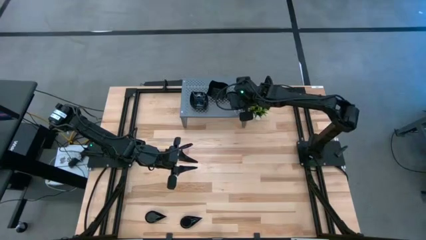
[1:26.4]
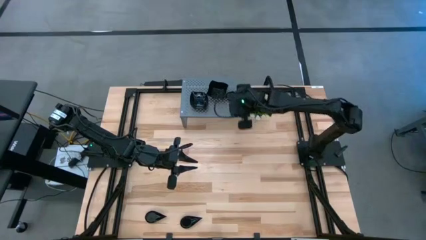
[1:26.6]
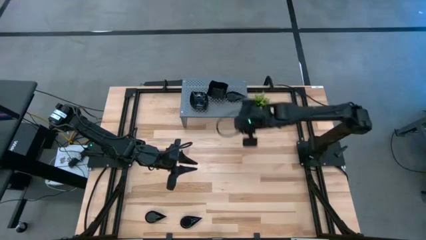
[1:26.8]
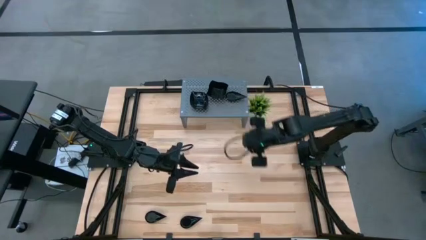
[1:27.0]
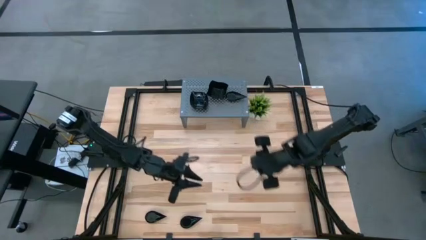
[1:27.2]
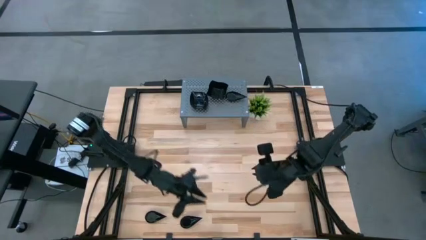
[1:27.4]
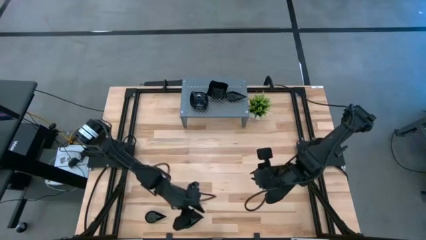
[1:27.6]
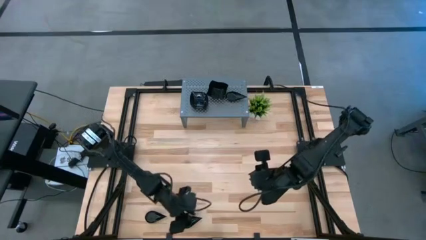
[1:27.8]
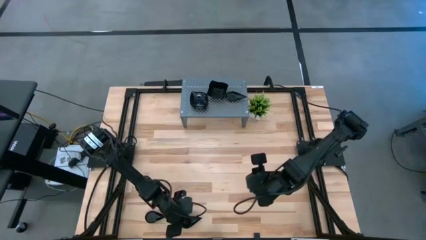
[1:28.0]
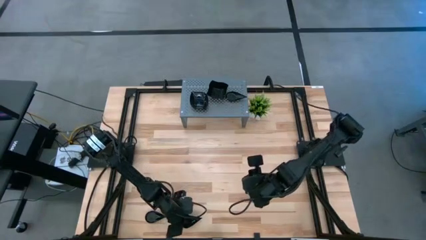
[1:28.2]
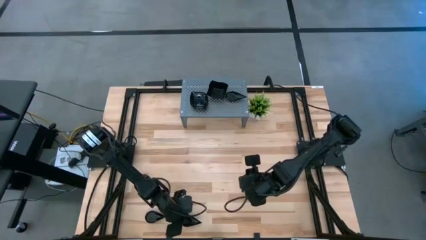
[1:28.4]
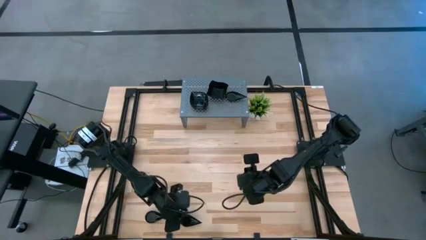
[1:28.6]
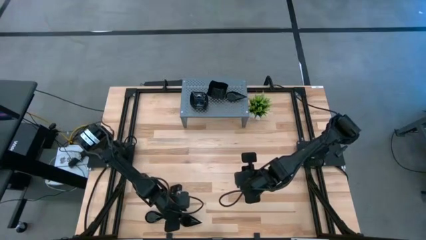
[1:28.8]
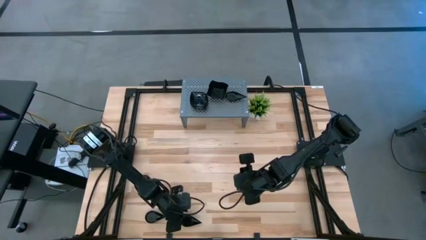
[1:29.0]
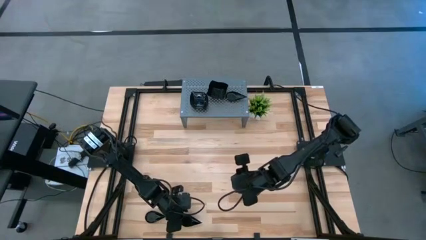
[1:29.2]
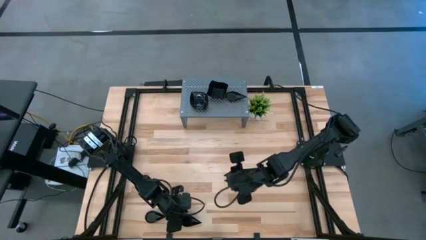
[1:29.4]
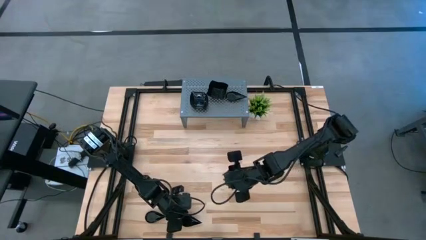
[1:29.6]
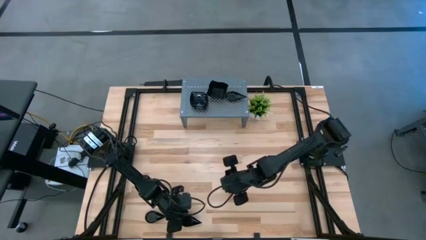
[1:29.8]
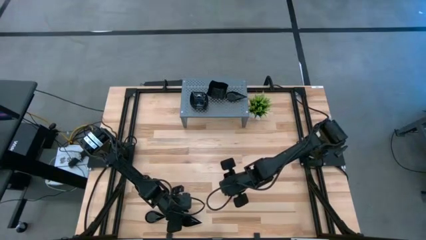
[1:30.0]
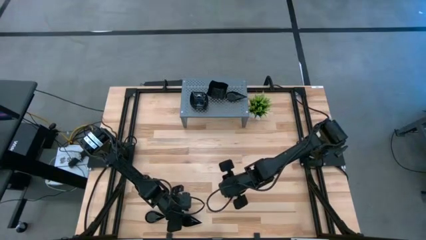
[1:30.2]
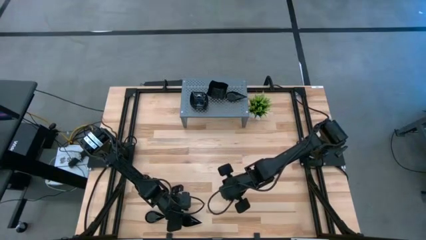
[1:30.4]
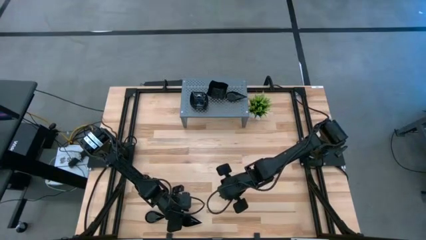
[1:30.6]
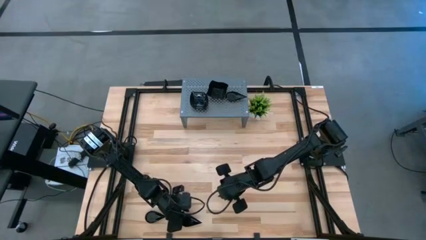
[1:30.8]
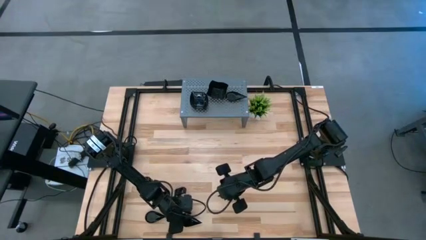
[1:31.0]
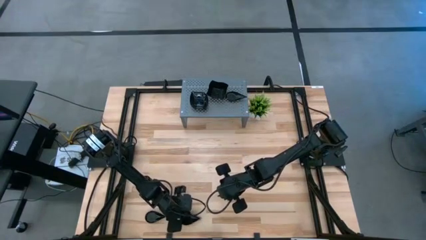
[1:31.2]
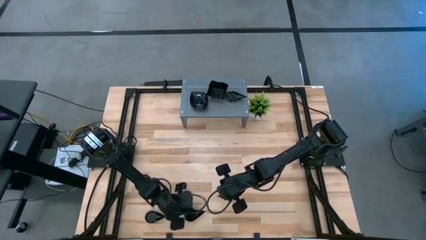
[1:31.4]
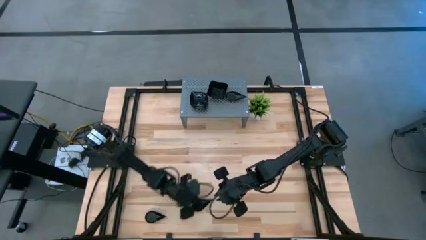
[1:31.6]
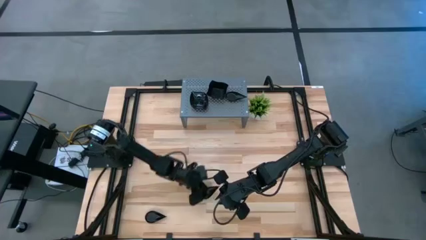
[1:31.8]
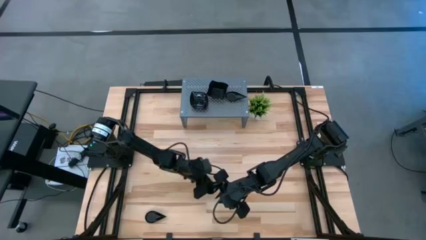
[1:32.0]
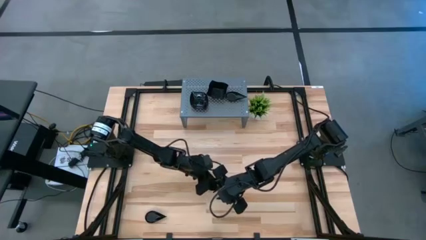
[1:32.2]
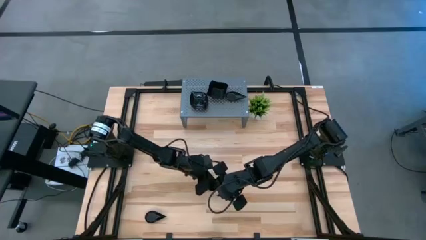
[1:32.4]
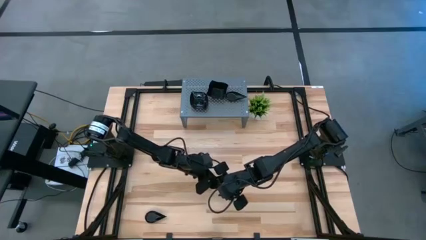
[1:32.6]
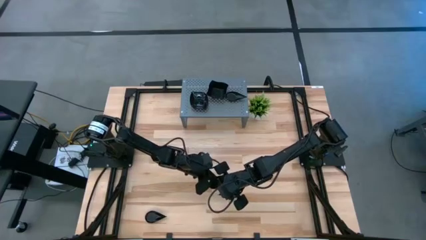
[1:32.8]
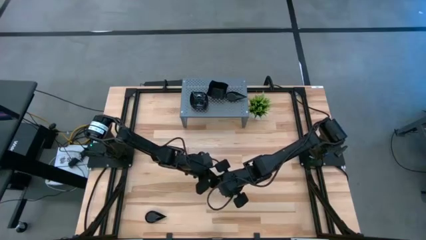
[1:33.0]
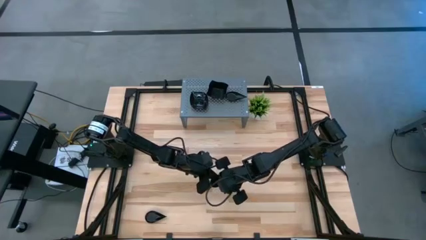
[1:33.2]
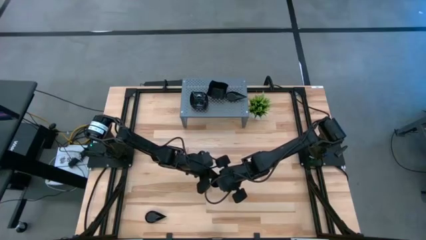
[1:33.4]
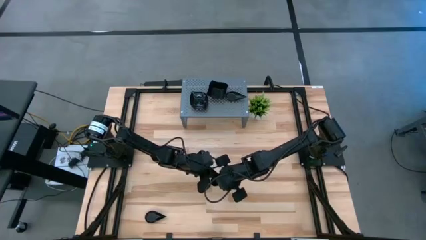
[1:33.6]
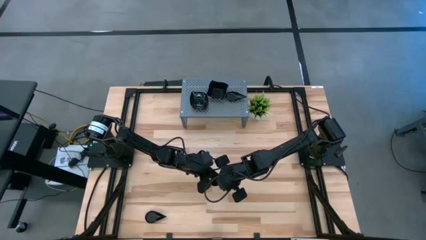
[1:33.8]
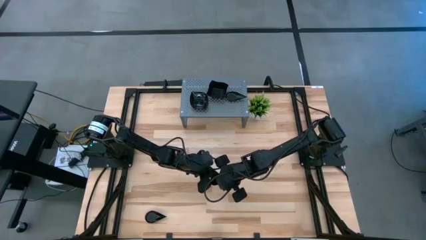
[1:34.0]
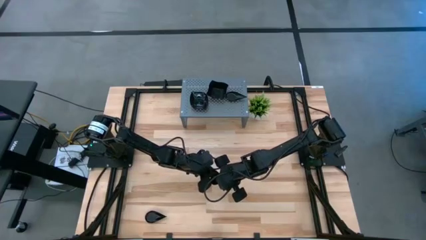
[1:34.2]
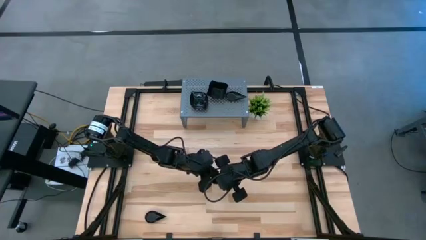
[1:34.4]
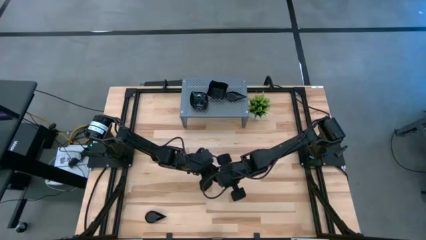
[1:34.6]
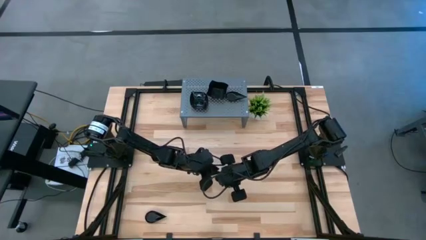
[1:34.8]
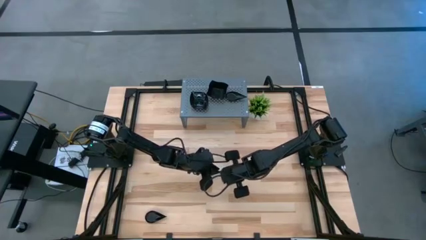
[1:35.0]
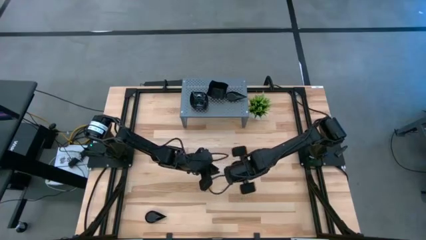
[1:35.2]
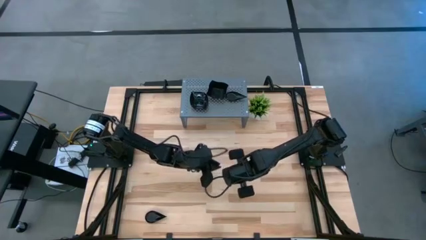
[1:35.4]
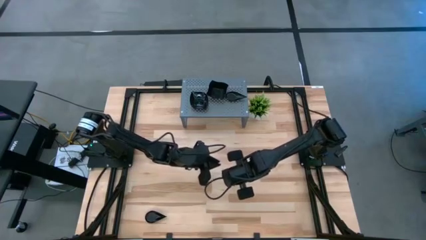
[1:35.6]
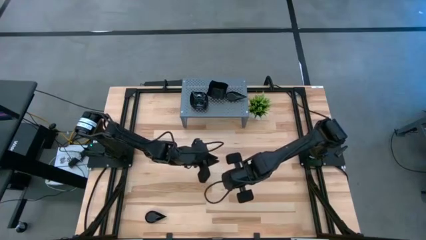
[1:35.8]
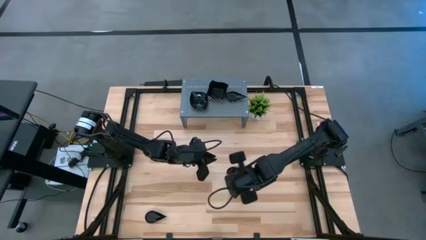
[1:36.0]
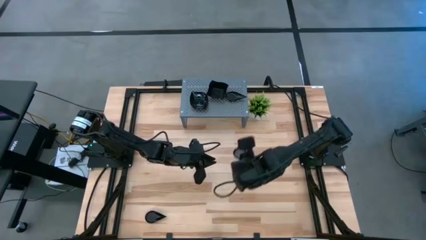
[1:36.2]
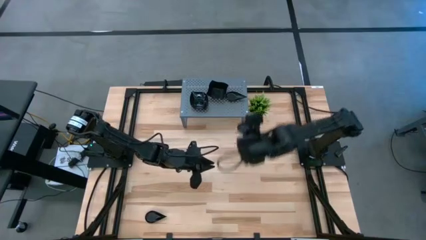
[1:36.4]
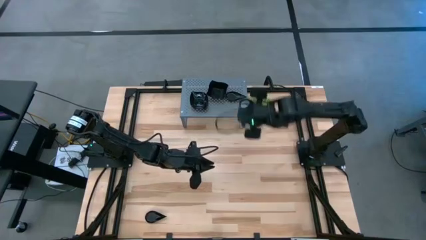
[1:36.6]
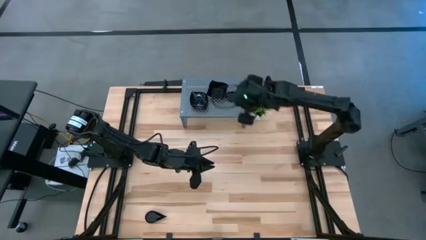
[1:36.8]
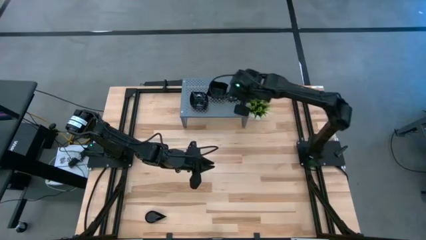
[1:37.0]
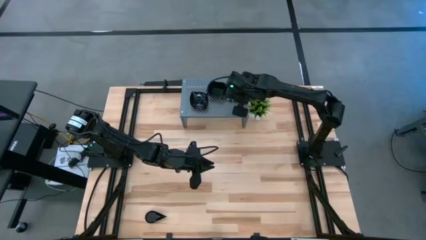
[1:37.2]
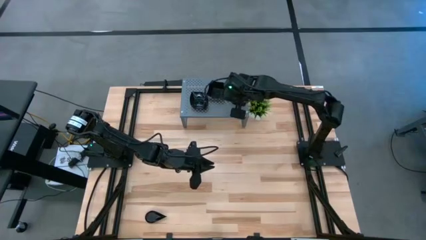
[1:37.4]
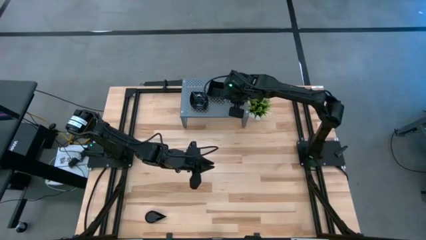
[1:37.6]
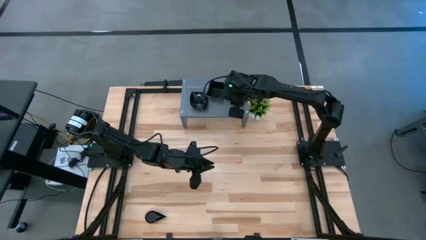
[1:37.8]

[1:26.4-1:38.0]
Task: Pick & Place Mini shaped plates
Stack the black drop-shaped plate on top of the stacked black drop-shaped plates on the shelf

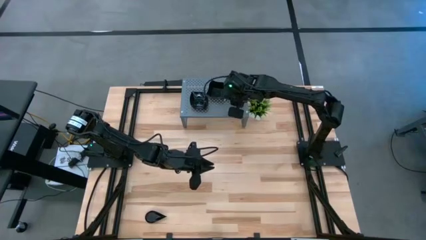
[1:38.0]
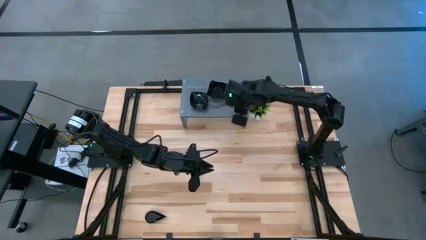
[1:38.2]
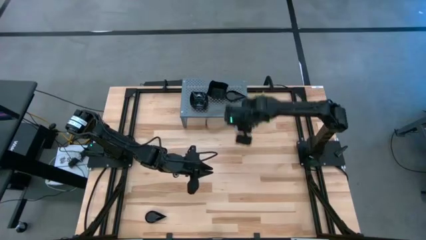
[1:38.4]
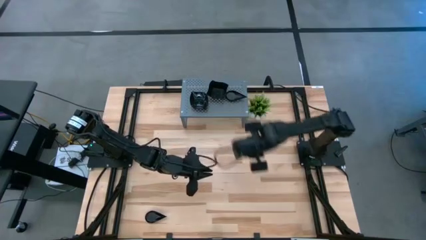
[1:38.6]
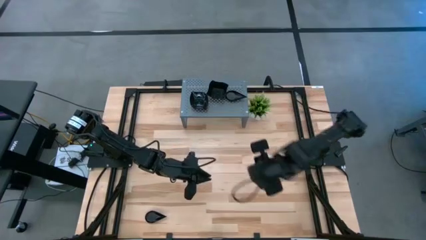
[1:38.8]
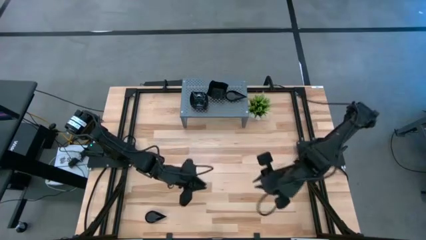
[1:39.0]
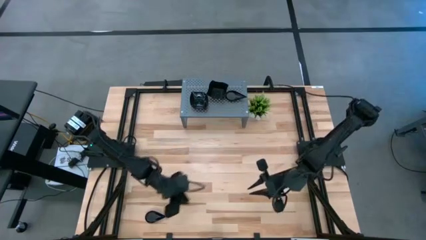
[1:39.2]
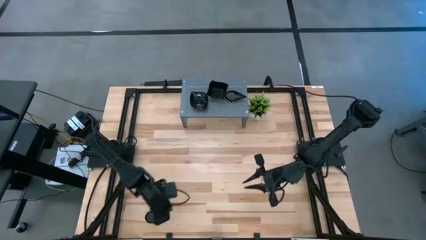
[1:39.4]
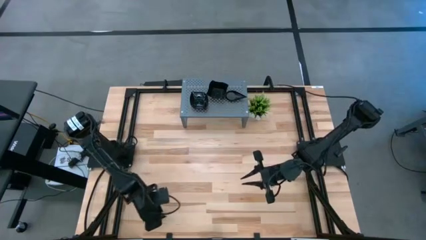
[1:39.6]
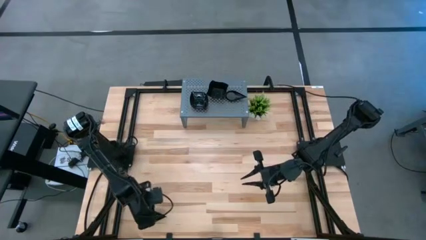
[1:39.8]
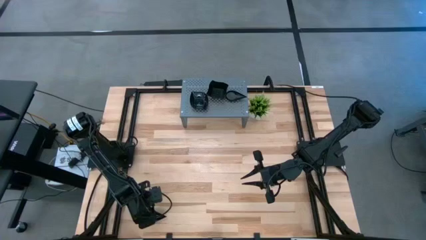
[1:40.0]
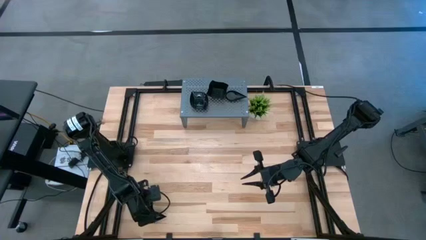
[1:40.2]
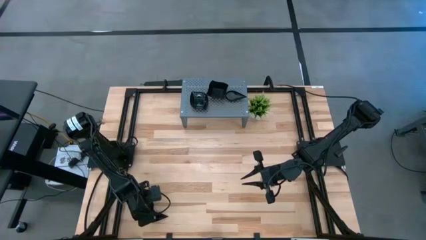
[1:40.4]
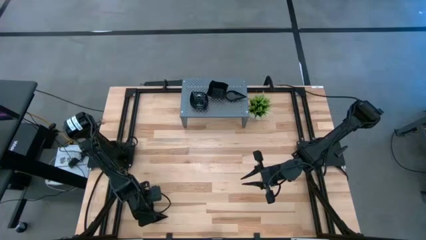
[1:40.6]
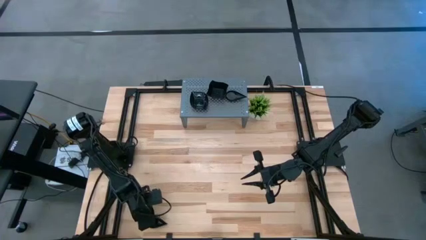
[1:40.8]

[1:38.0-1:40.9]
Stack the black drop-shaped plate on top of the stacked black drop-shaped plates on the shelf

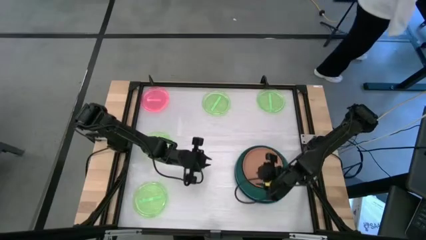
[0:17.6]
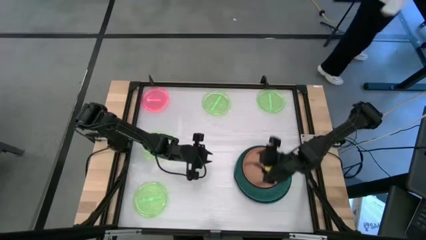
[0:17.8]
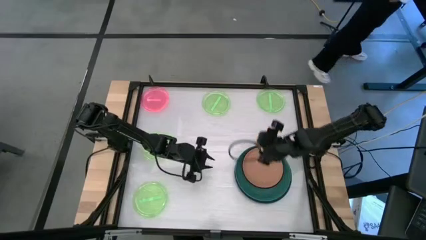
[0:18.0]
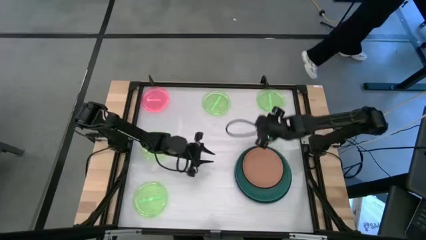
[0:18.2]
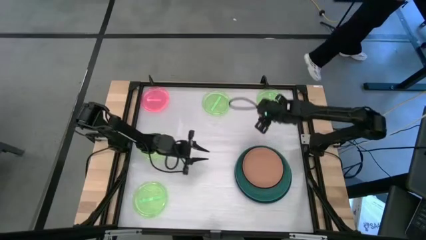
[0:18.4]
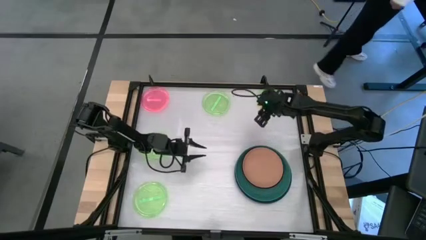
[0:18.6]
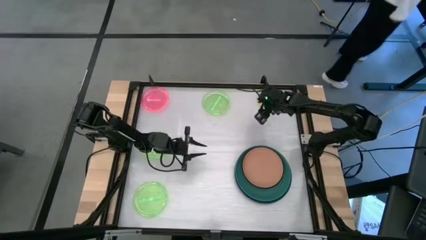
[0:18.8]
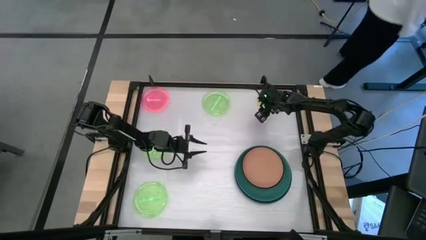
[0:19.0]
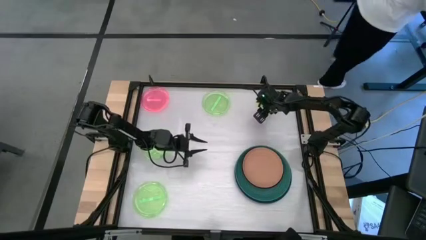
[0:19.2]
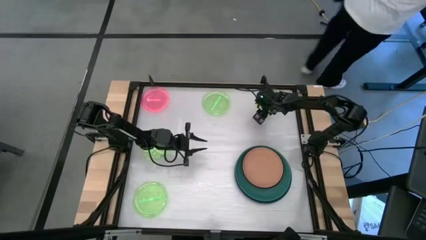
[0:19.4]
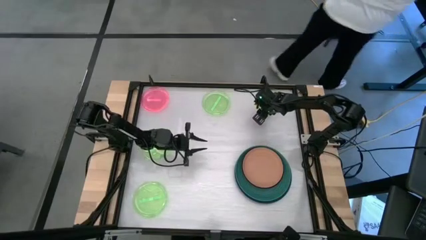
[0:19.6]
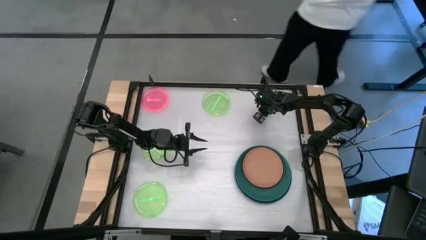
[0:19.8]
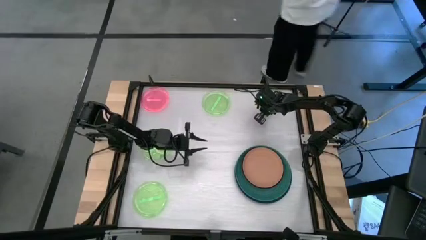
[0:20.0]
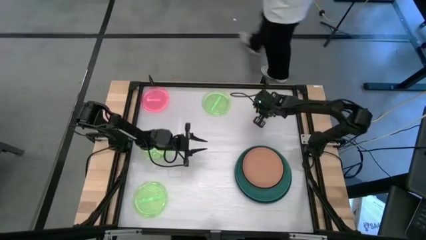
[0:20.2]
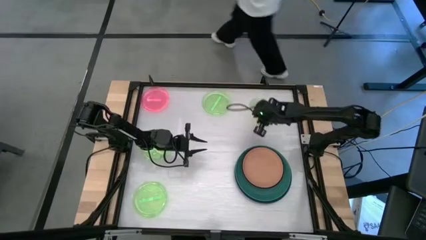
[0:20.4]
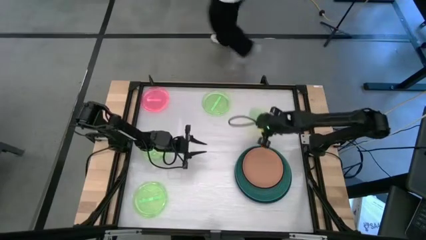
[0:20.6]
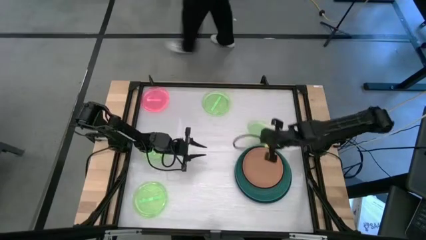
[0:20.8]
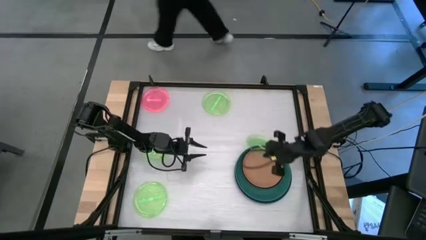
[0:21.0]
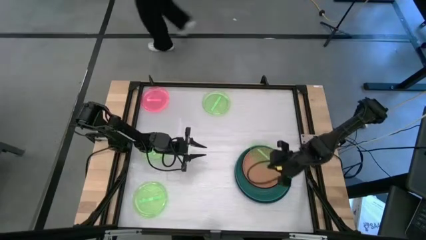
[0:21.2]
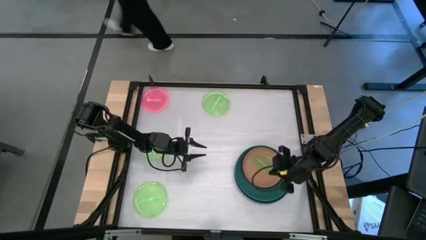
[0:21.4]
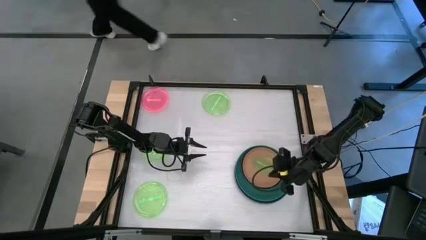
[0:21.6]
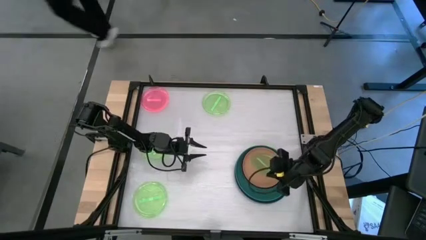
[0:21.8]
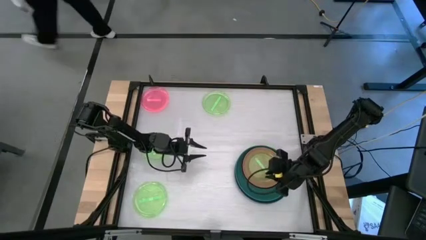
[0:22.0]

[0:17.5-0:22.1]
Task: Stack plastic plates
Stack the light green on top of the orange plate
